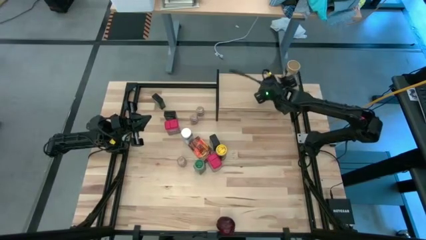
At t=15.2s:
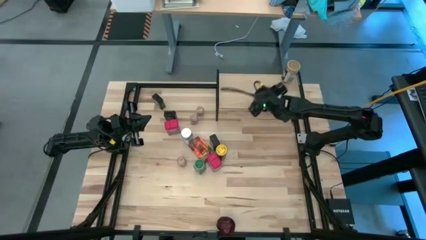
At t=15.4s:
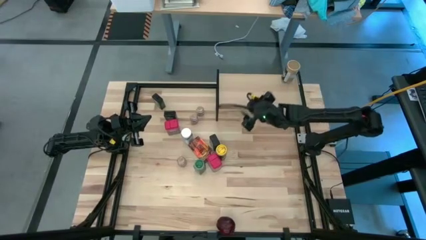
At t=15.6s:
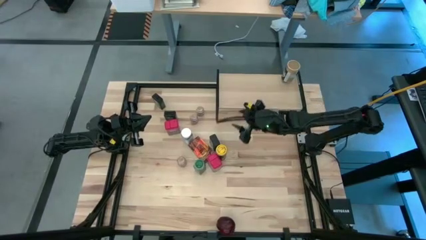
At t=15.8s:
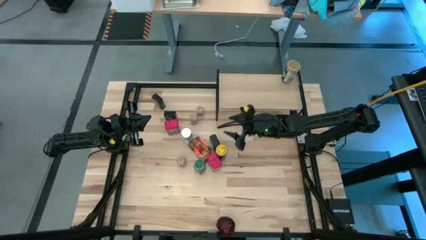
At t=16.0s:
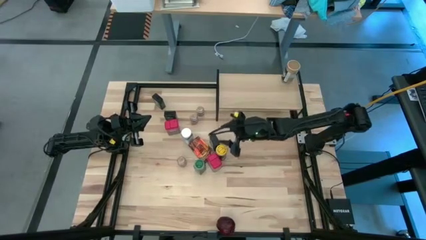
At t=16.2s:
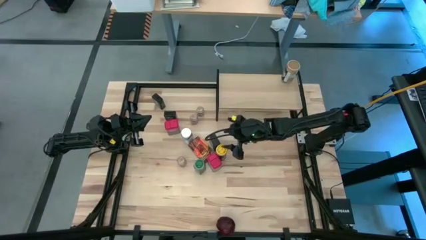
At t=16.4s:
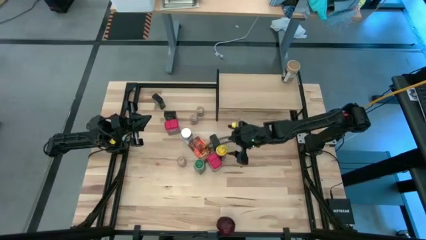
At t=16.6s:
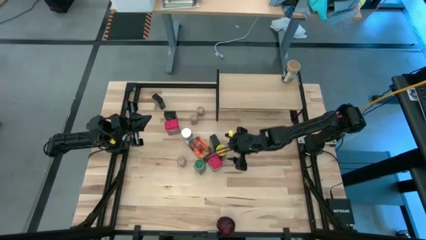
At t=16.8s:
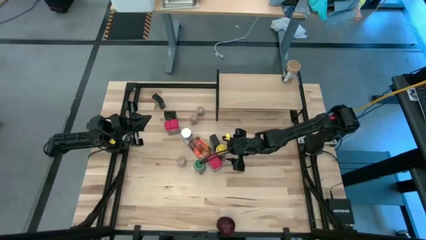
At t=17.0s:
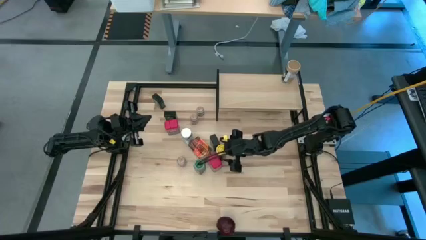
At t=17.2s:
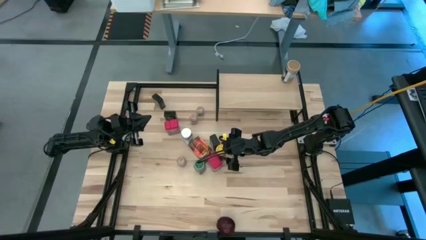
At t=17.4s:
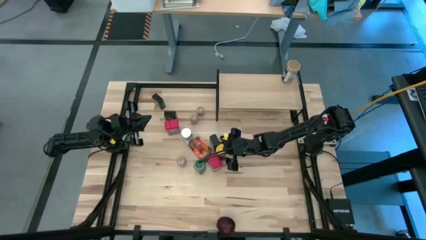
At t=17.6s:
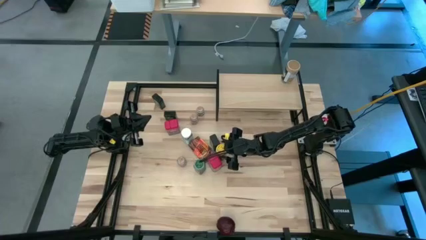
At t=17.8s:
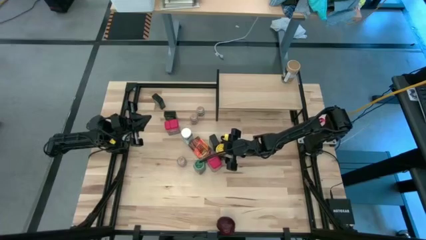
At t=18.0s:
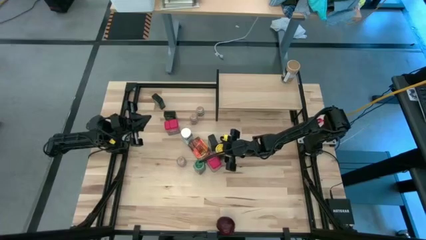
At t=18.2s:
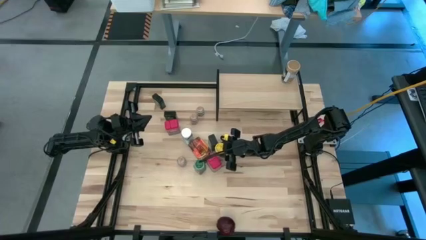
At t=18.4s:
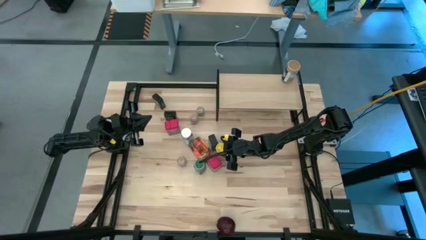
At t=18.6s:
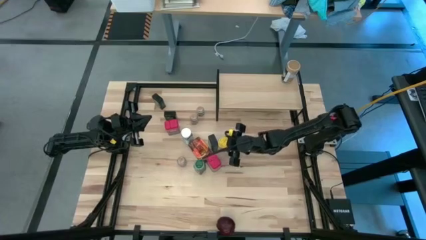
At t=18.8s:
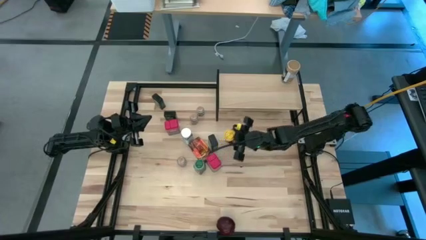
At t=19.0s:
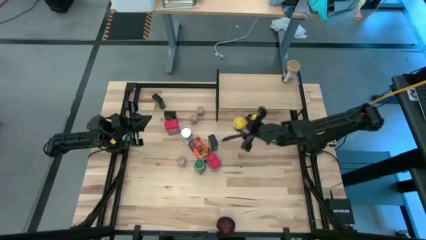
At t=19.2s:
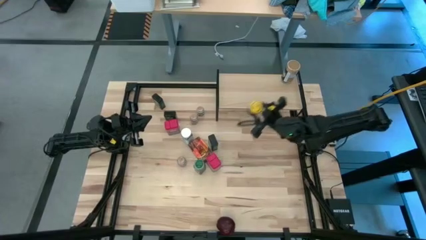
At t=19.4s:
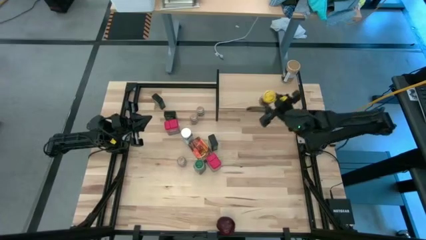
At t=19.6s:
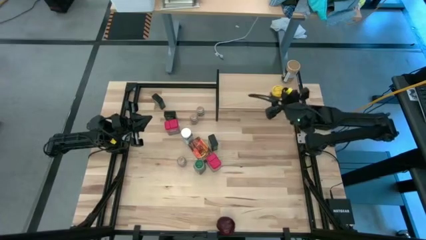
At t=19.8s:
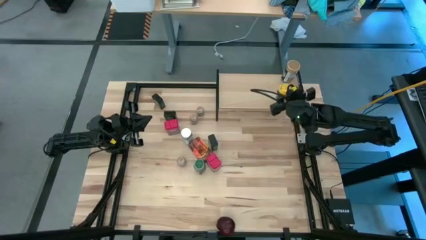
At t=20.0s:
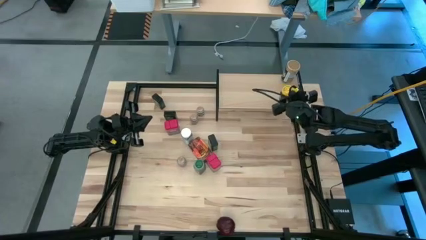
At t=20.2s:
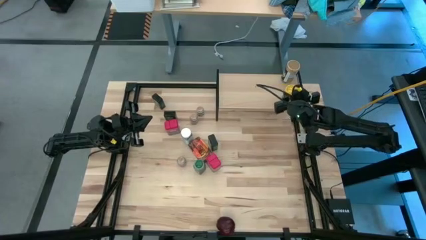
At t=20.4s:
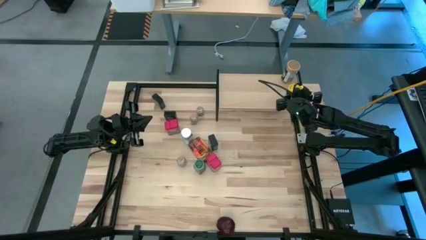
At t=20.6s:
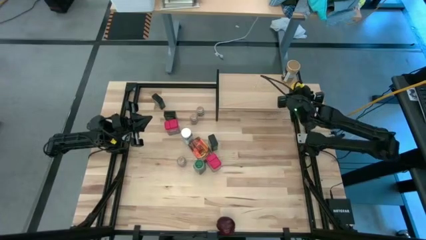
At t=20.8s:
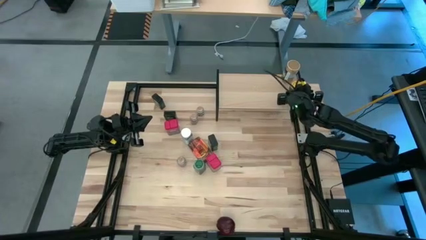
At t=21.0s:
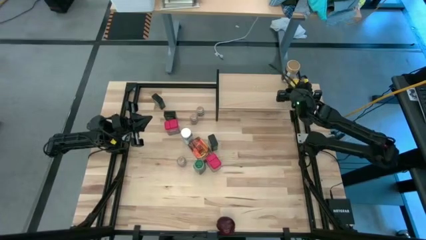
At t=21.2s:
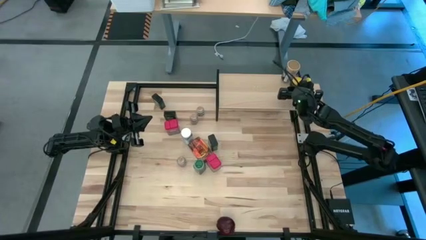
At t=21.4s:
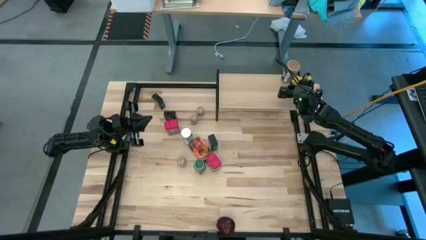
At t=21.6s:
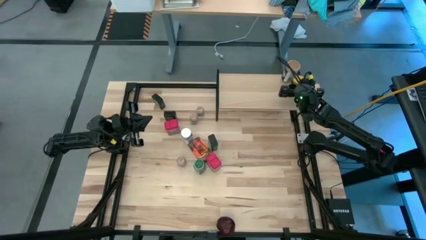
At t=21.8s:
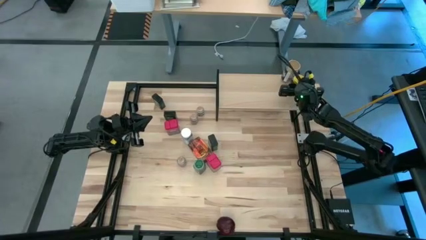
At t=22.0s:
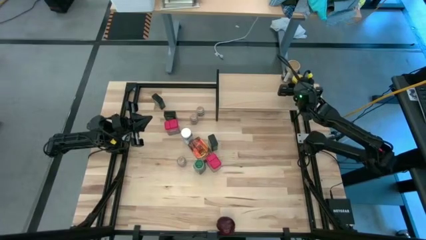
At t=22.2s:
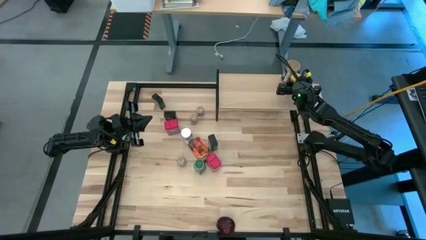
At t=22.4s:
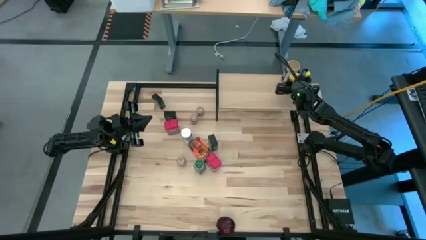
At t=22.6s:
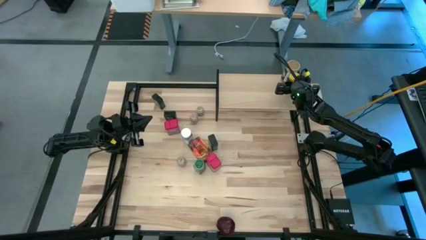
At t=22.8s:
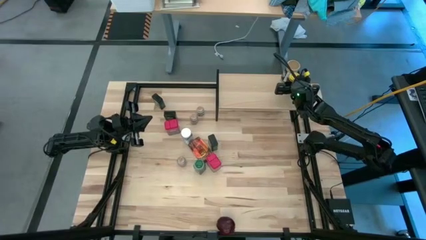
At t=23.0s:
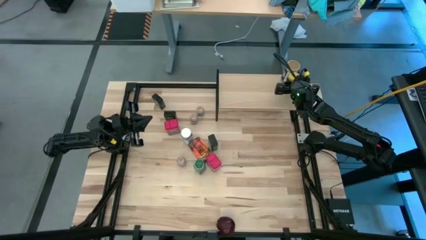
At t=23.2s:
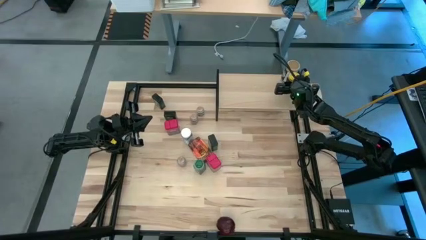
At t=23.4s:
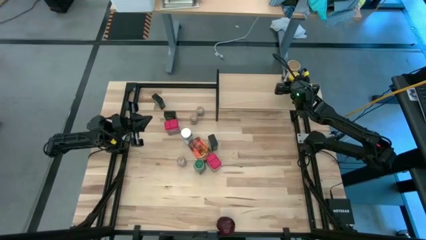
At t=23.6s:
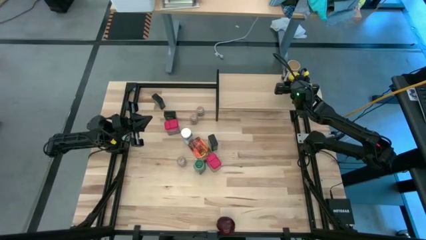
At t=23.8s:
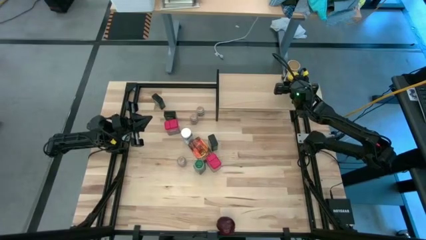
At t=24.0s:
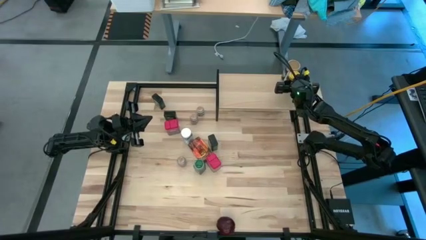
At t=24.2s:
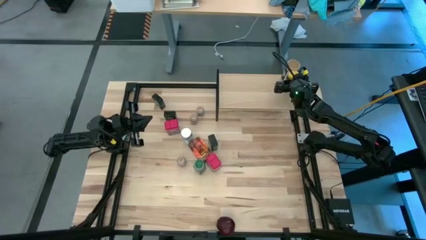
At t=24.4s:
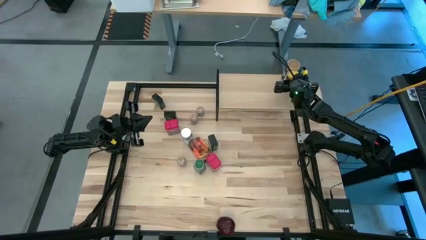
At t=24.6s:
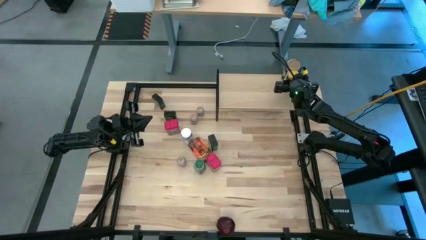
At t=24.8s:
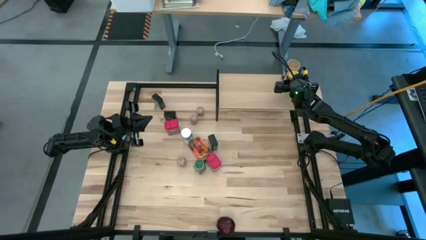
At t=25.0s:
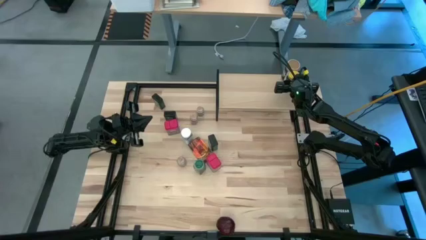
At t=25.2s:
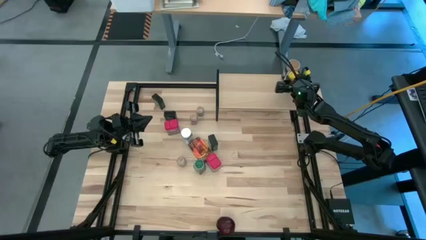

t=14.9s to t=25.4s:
Task: Shelf spices
Put the yellow seasoning bottle on the shelf
